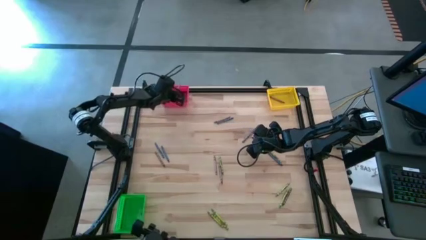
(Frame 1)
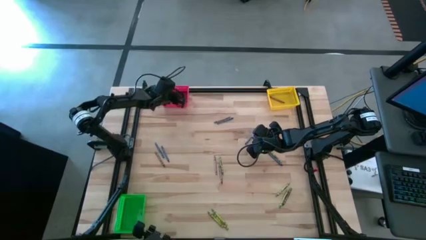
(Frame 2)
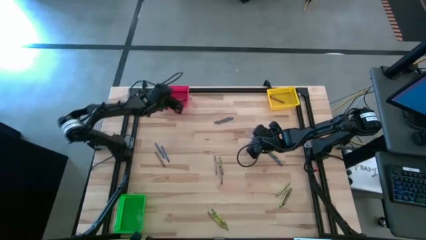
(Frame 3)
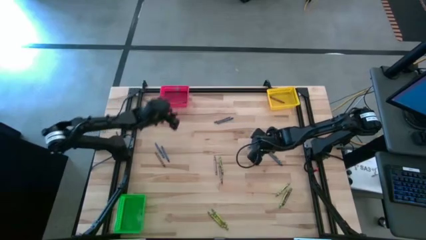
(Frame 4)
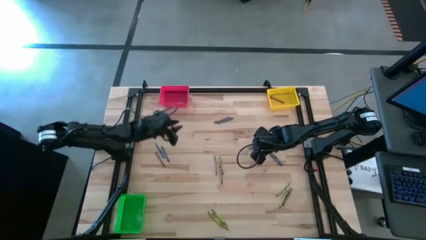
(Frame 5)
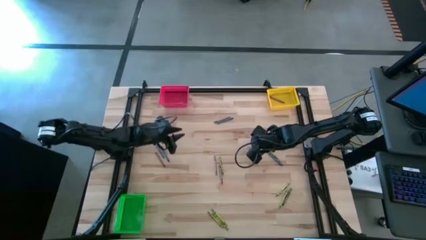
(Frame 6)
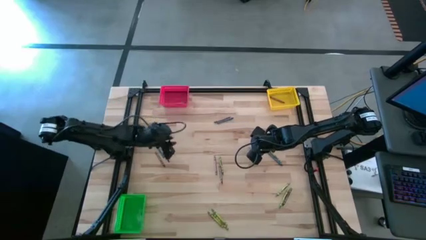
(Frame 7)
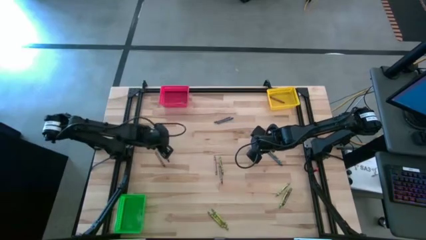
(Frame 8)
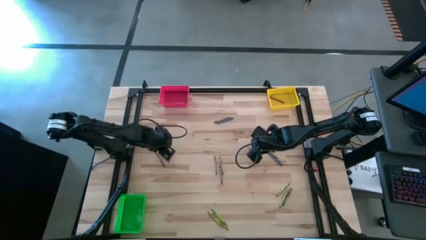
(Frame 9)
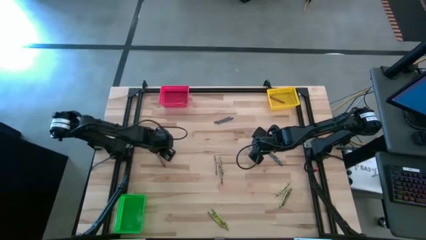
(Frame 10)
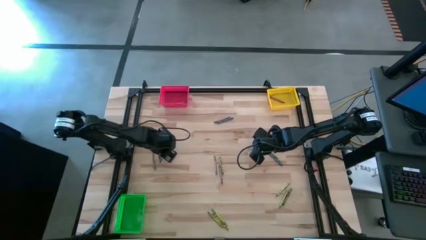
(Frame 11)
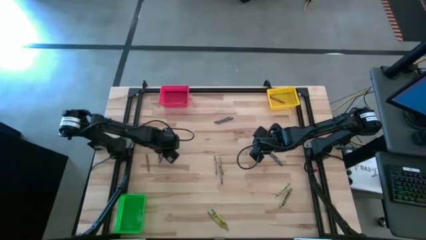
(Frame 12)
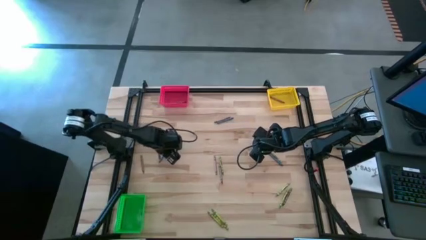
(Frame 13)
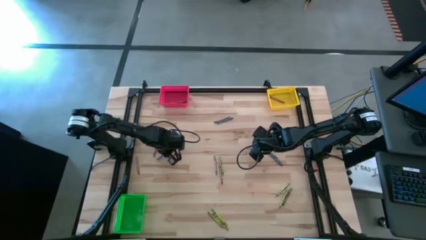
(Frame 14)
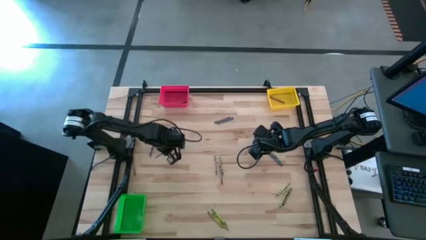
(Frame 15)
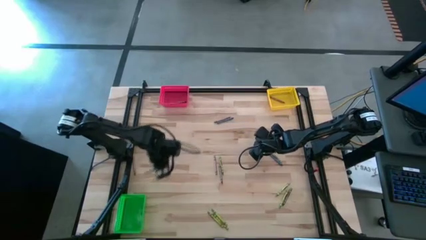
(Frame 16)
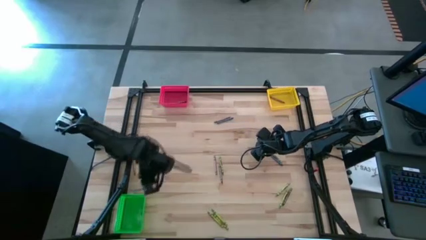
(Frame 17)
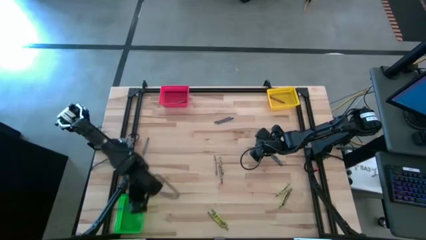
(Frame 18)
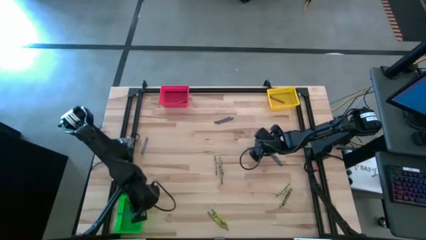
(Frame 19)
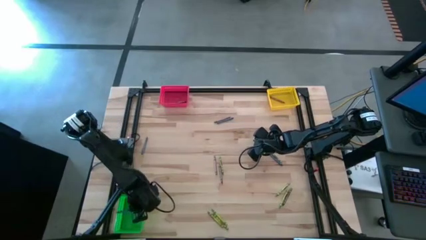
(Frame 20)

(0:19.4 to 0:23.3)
Task: Sort crayons
Put the blue crayon into the green bin

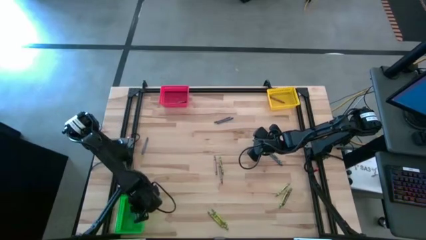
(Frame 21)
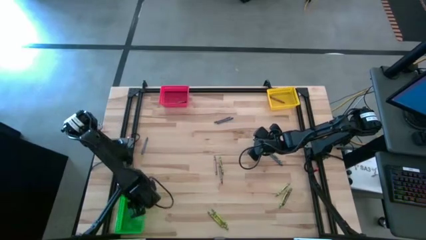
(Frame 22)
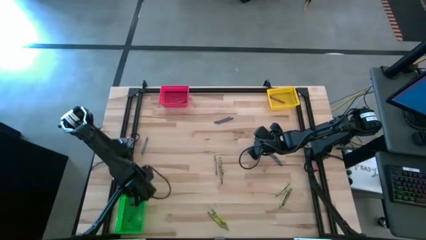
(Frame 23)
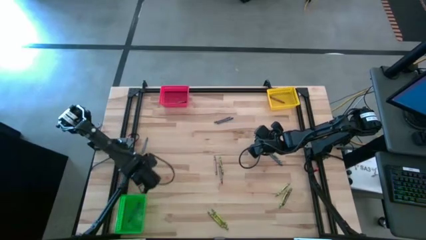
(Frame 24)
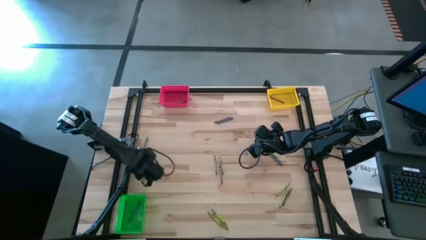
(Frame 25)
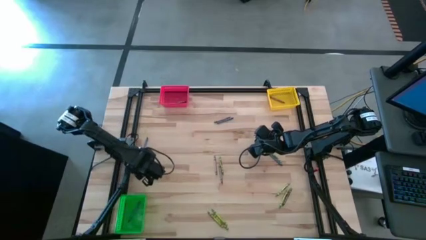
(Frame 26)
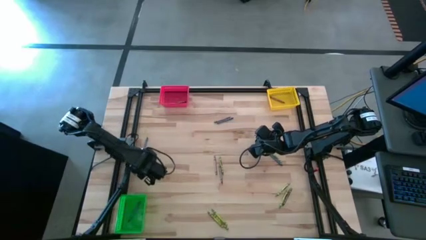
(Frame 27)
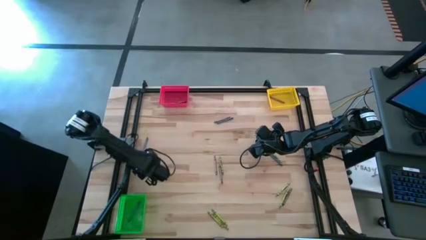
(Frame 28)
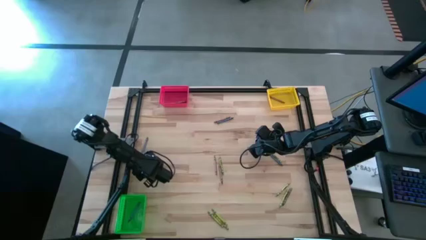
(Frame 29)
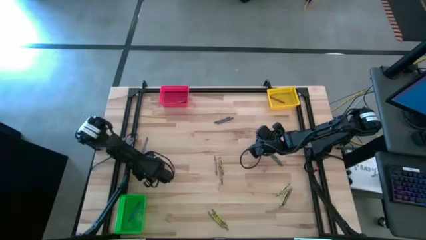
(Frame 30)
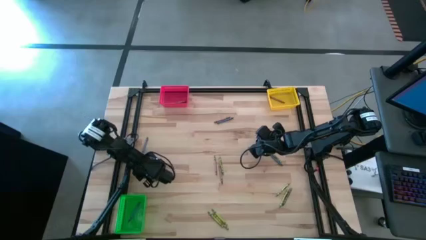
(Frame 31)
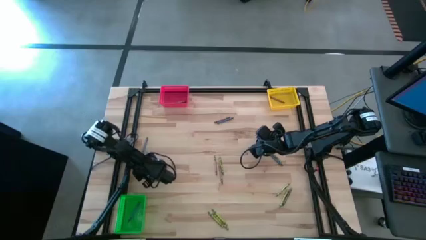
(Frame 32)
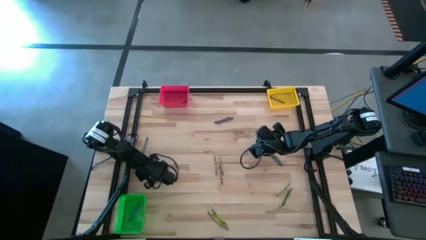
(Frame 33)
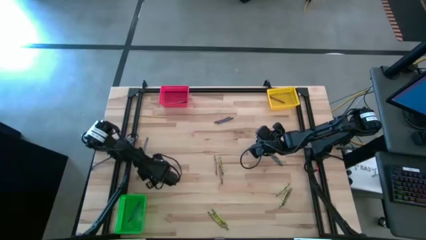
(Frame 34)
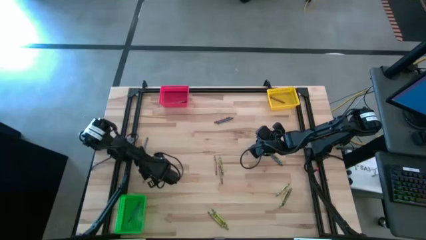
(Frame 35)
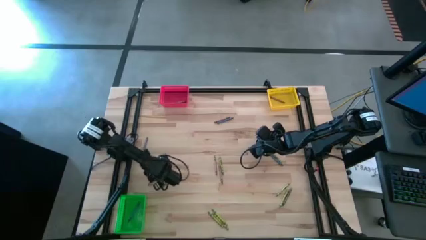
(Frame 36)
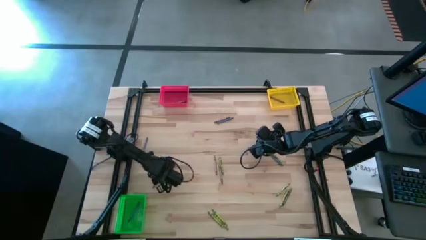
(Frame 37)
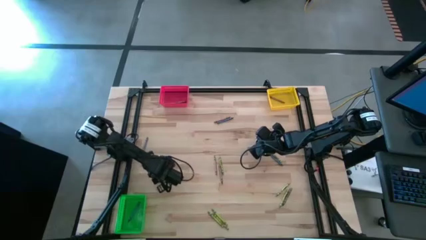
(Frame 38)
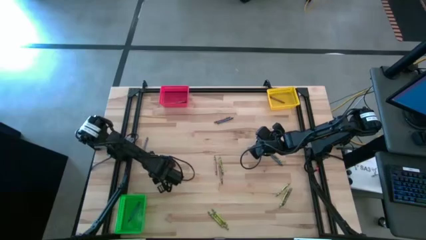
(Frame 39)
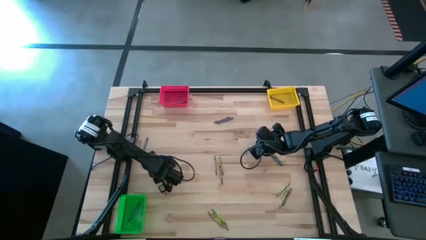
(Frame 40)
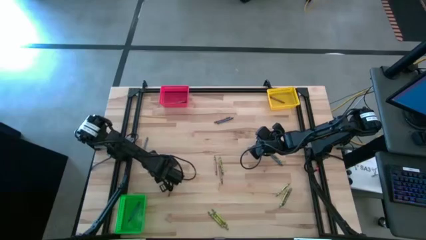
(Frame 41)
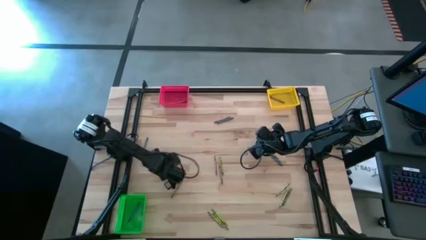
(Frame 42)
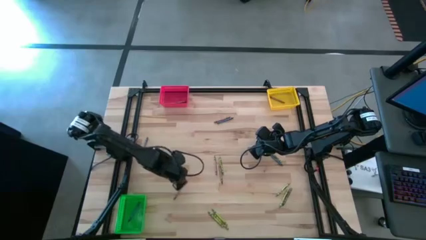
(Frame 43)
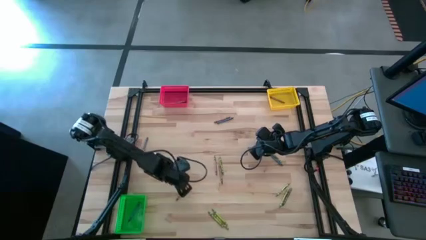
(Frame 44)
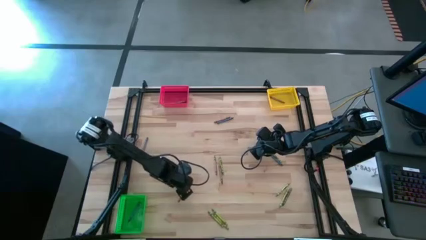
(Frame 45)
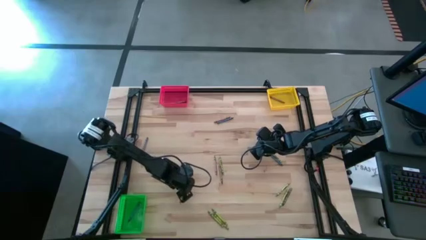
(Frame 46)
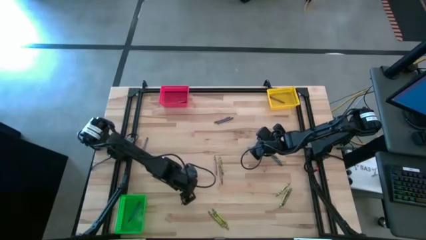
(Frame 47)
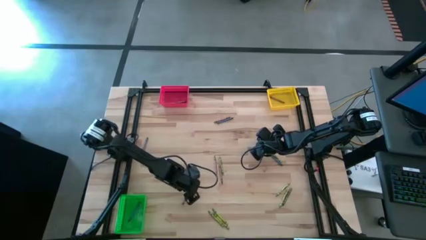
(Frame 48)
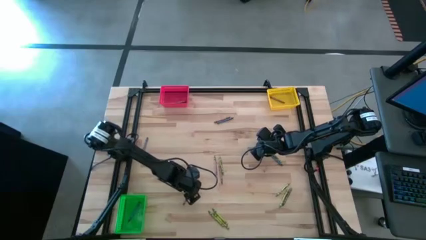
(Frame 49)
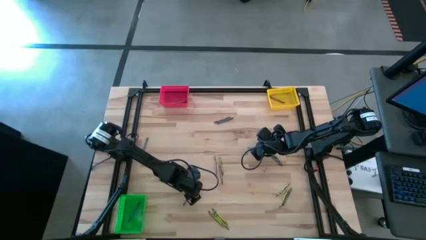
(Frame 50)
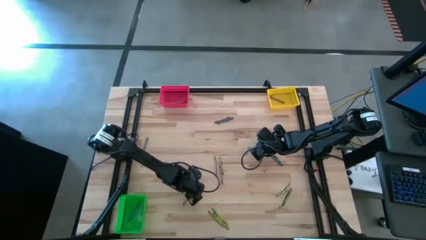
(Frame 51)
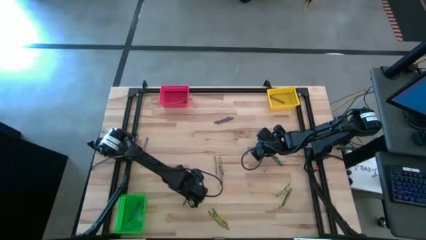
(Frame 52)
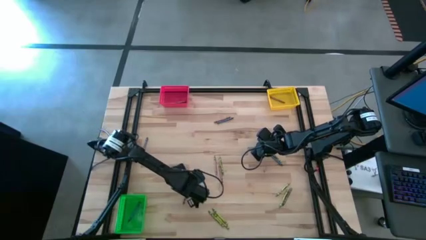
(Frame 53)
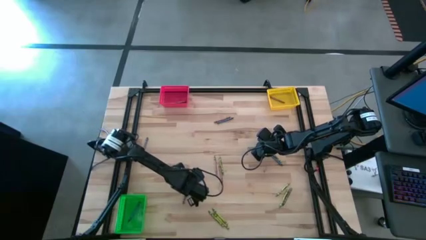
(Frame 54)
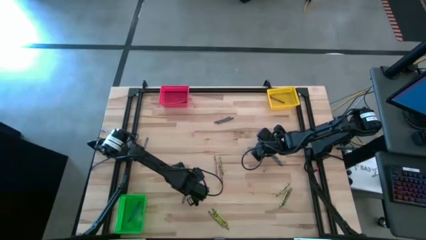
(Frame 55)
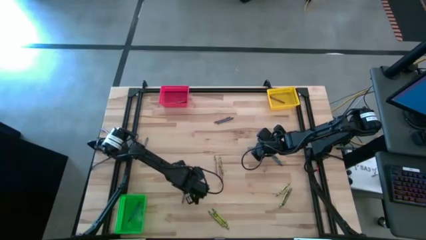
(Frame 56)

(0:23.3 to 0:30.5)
Put the brown crayon into the red bin

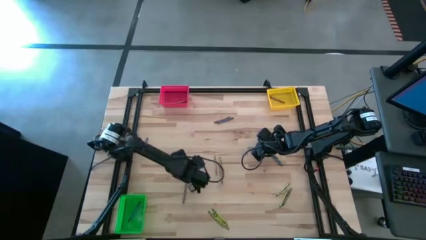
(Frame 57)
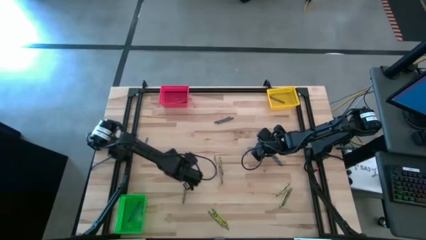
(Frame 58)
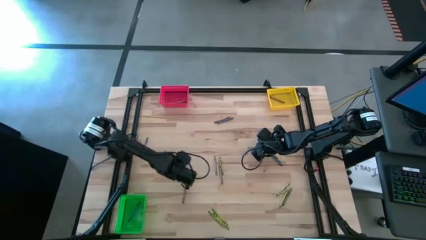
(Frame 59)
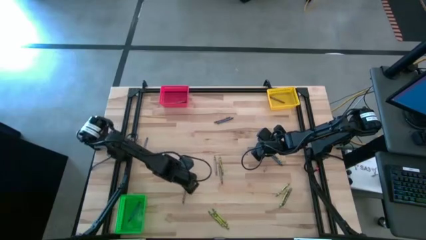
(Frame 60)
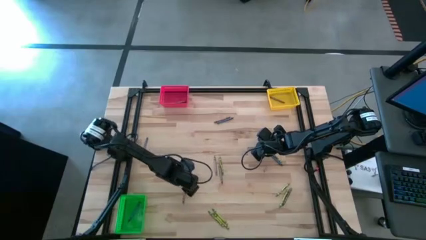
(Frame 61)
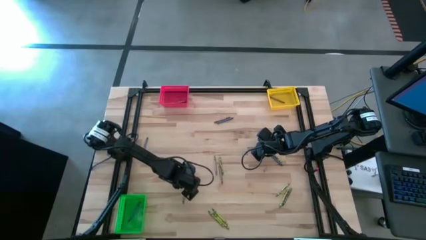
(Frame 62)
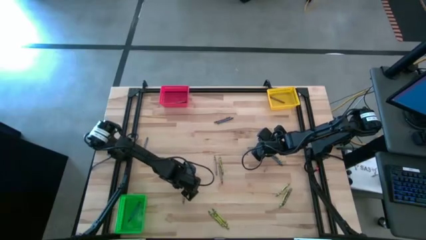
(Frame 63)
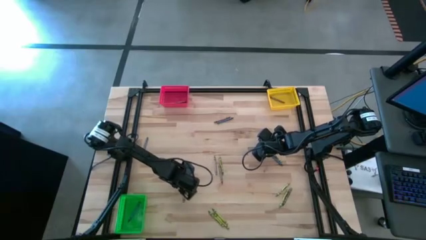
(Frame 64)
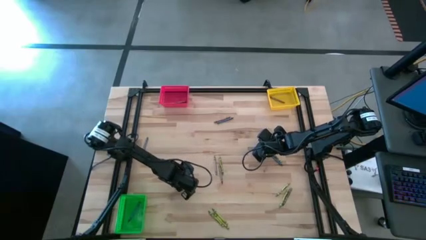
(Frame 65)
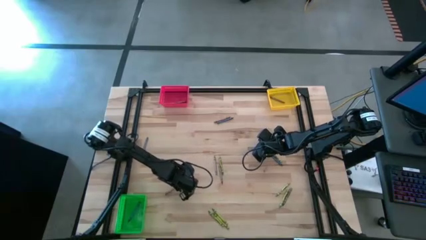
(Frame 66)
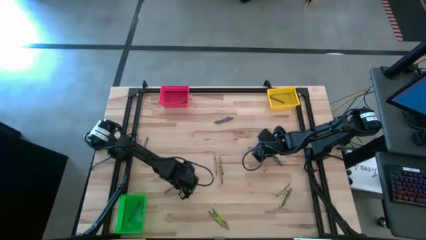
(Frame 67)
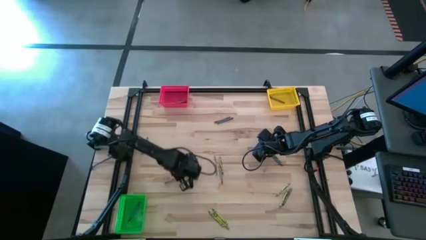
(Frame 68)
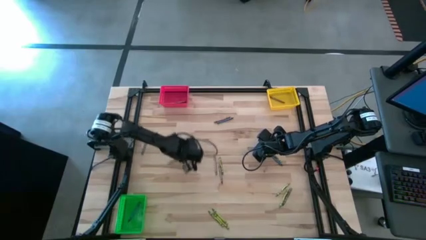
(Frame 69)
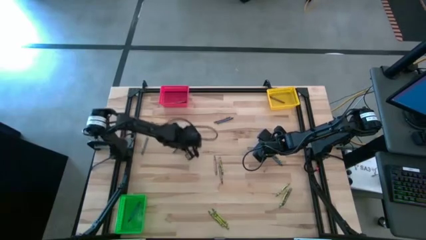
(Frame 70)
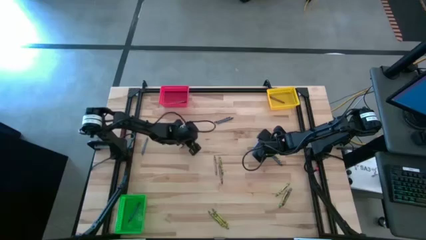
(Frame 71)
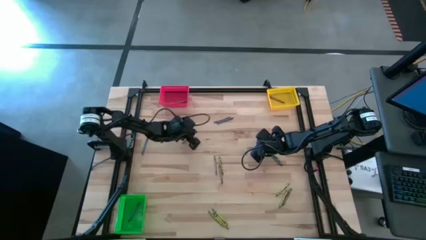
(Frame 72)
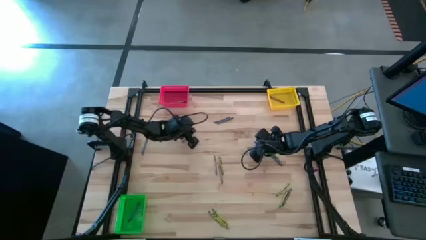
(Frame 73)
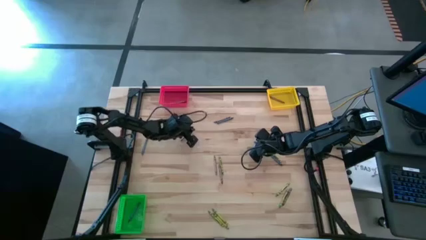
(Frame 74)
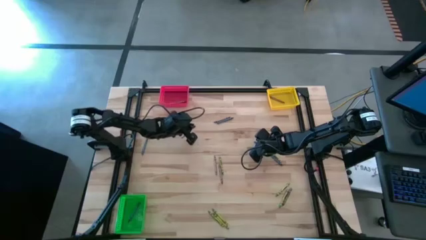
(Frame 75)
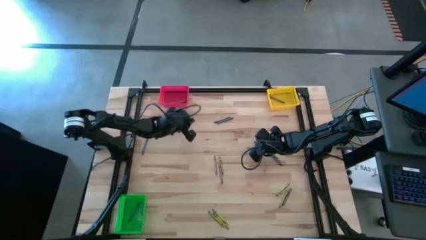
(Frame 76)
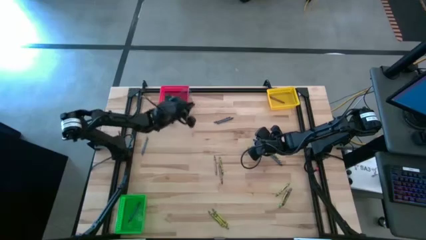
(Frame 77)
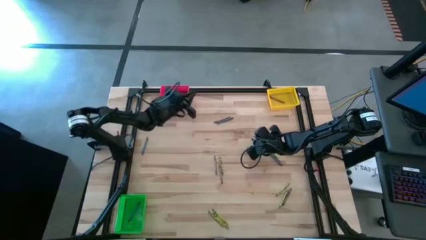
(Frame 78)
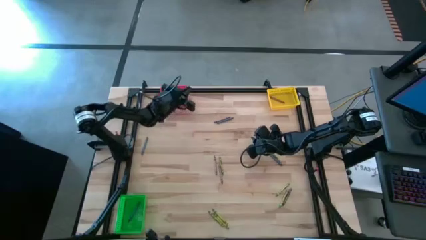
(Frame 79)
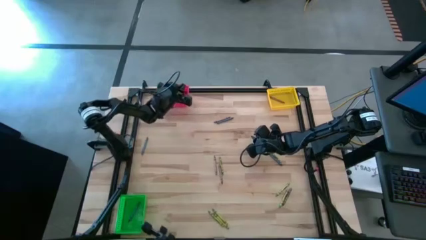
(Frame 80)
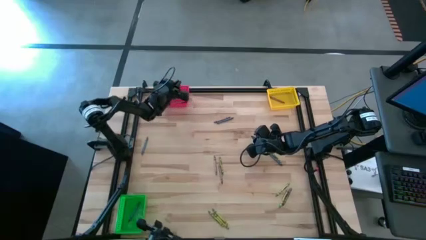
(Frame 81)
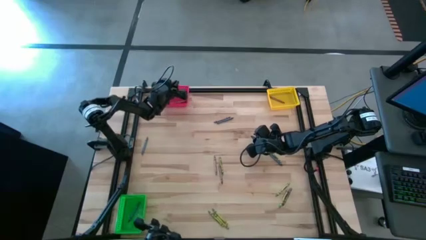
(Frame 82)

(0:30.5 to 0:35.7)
Put the brown crayon into the red bin
